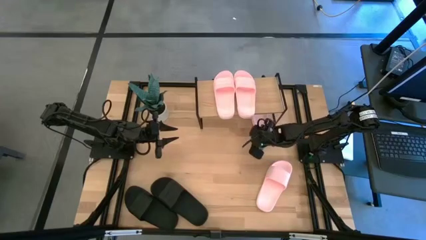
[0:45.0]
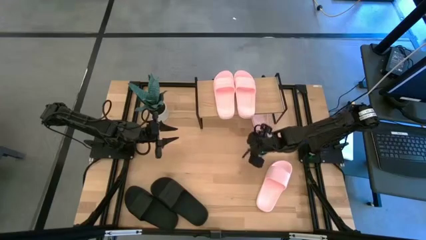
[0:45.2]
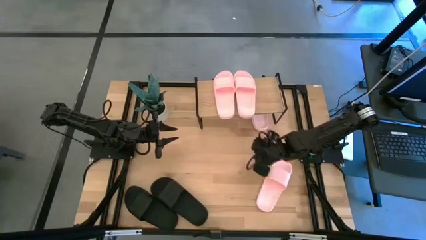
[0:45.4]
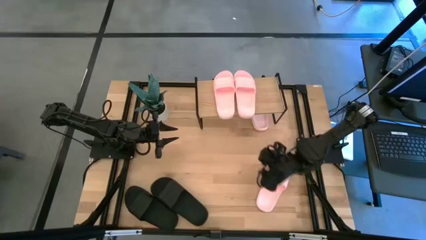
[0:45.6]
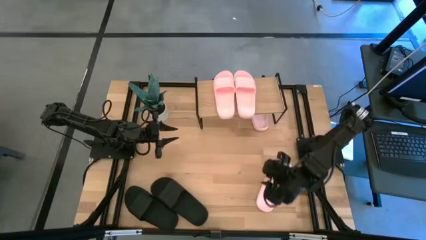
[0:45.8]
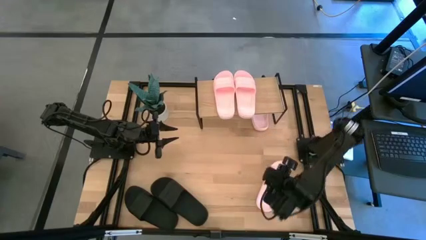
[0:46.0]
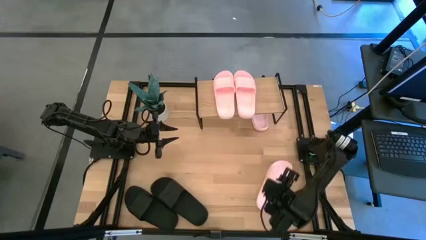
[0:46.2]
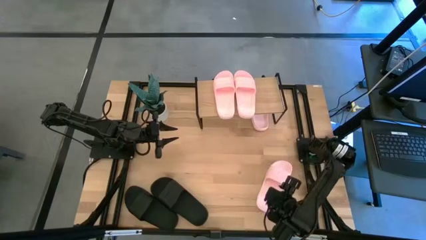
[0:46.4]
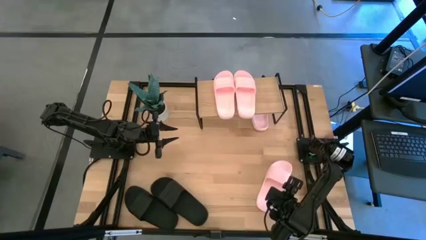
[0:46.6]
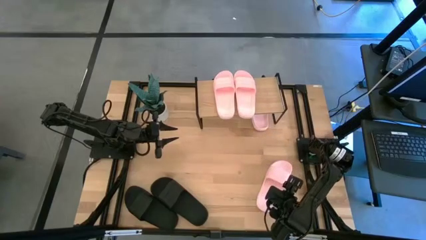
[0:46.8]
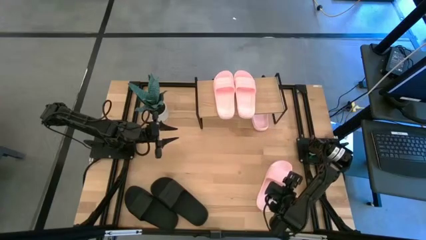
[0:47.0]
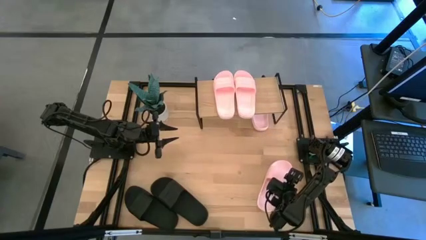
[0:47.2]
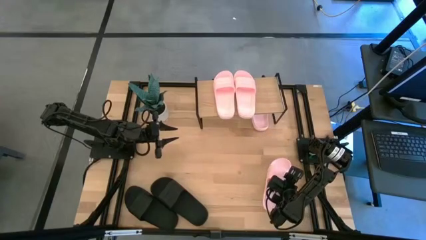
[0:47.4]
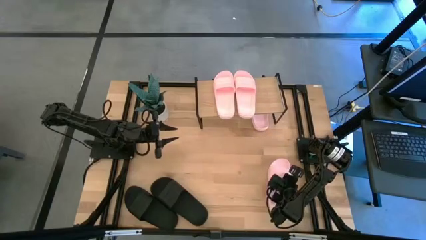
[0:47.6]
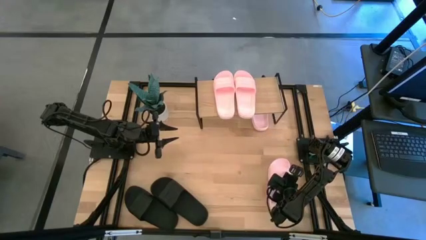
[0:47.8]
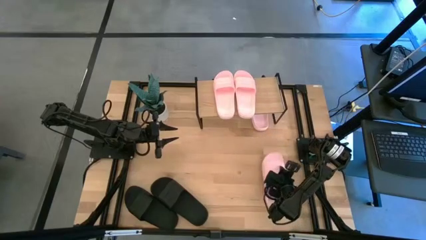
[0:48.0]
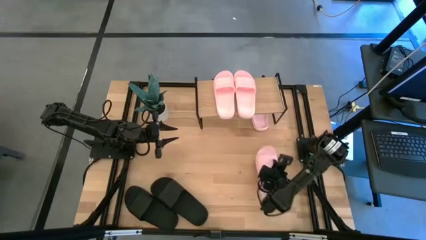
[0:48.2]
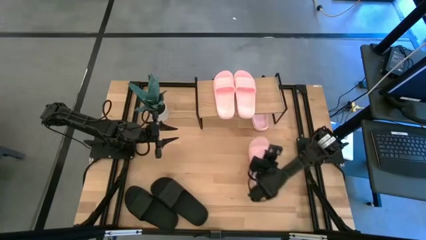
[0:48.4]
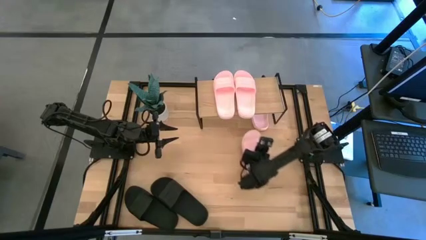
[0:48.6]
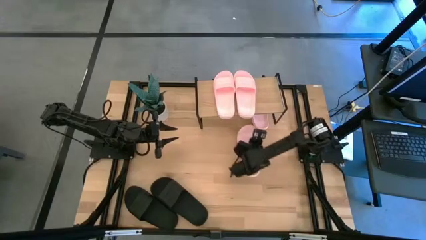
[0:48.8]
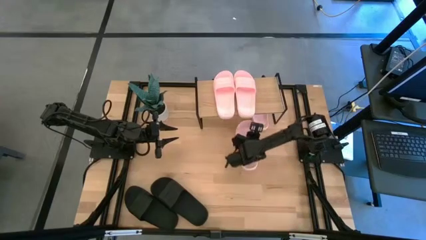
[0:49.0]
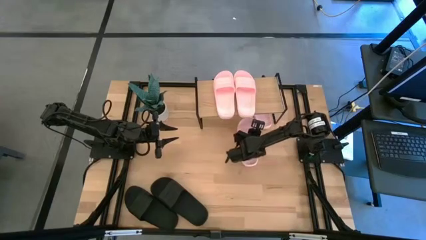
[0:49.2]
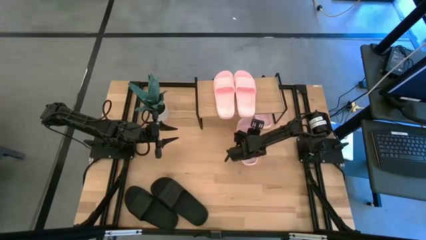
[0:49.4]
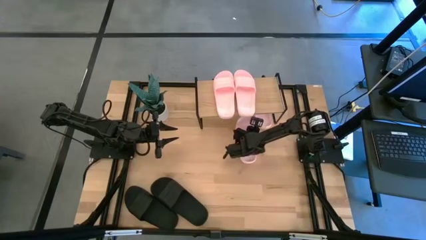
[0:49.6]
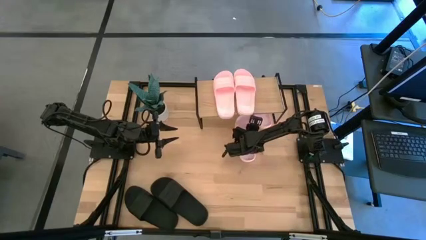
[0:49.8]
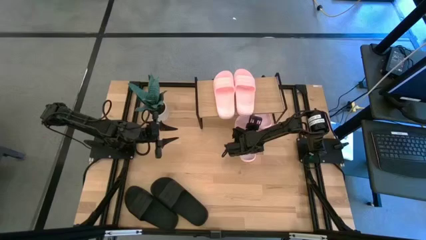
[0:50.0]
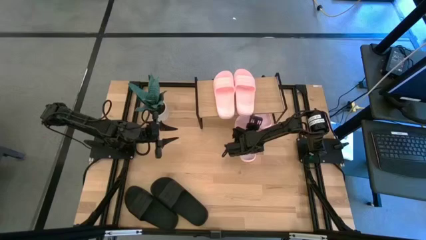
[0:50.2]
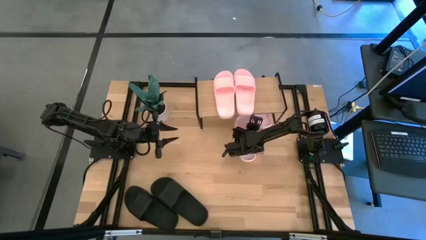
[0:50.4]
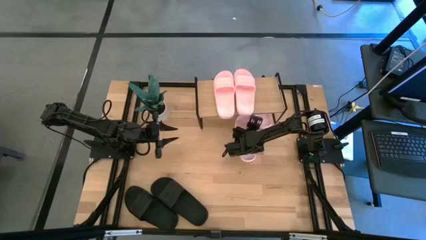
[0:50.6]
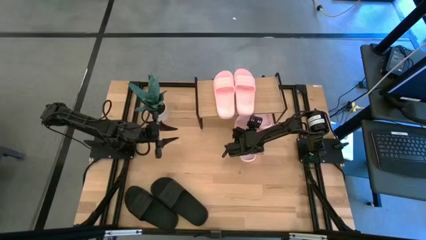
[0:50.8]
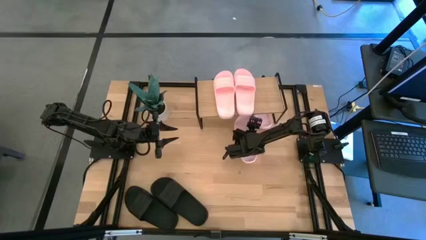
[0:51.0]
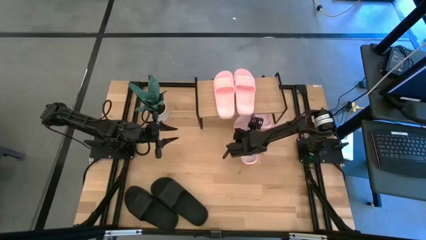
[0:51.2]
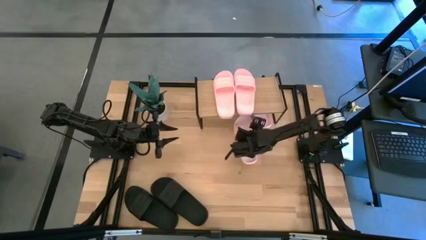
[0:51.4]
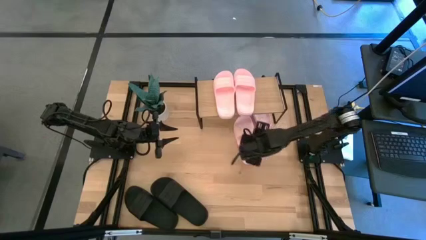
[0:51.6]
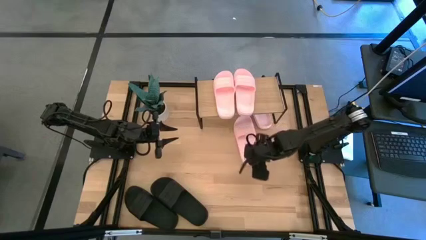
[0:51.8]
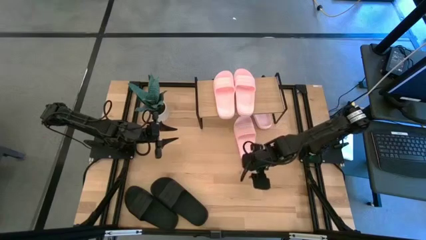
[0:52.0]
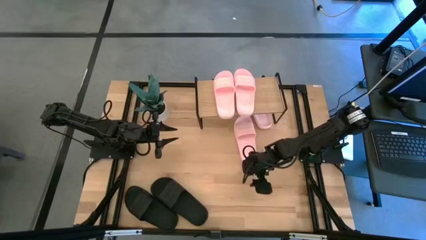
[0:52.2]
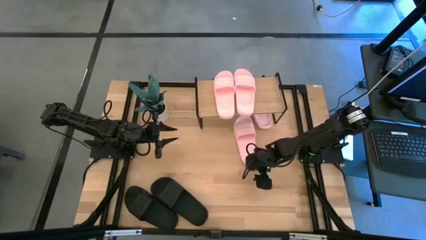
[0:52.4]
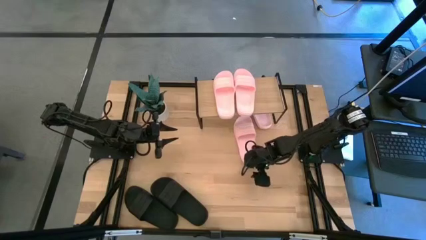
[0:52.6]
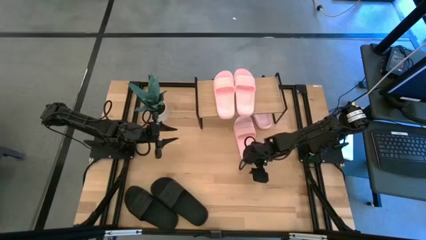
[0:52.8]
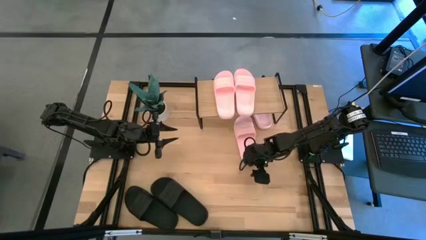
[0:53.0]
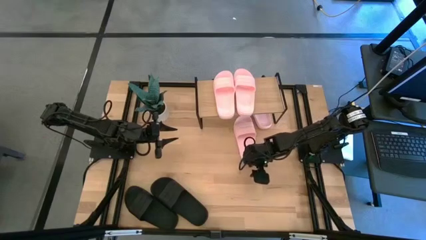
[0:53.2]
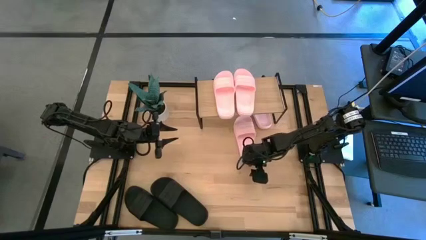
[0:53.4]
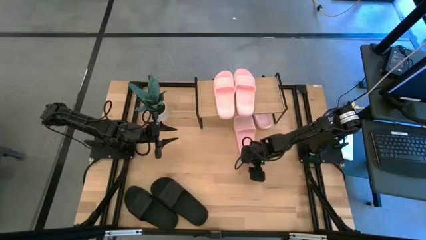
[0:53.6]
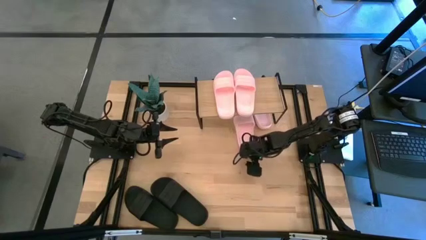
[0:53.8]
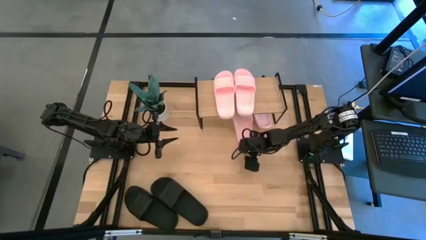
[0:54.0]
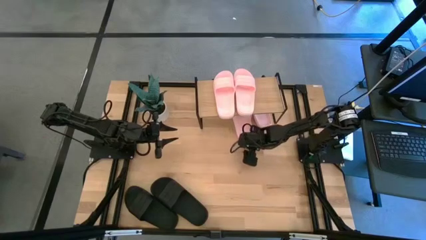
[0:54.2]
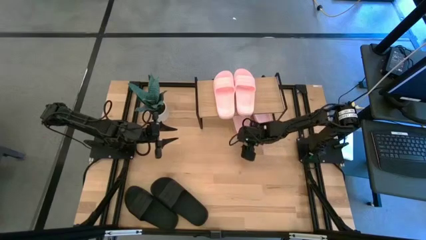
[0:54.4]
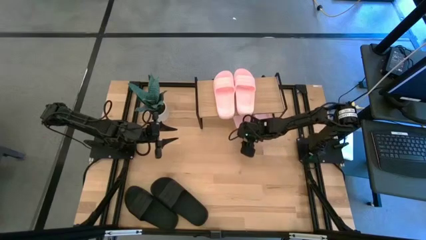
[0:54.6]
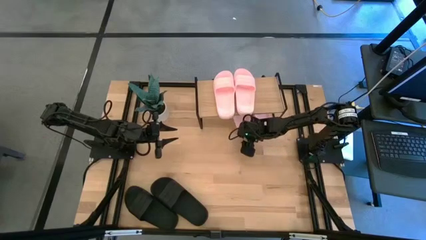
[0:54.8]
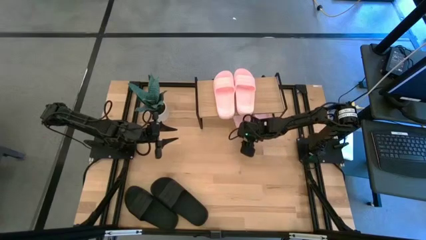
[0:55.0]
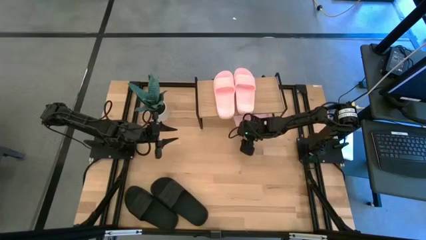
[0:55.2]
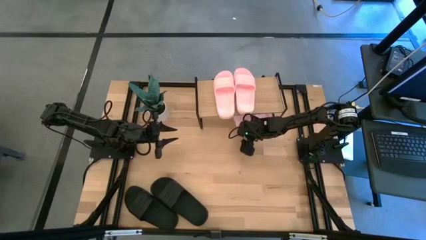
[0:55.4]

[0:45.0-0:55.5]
Task: Pick and place slides into the shelf
Put the pink slipper under the shelf

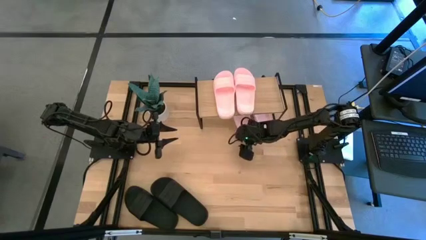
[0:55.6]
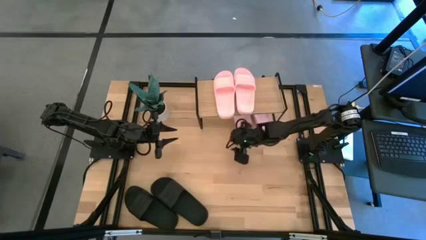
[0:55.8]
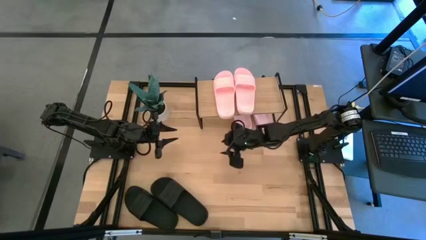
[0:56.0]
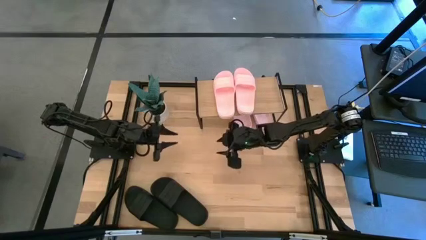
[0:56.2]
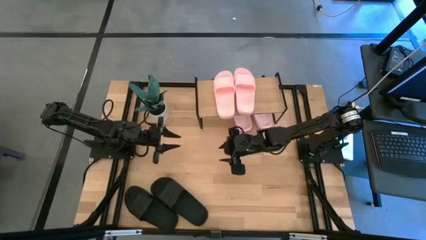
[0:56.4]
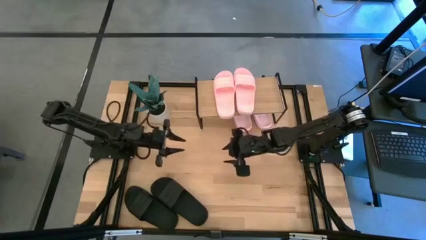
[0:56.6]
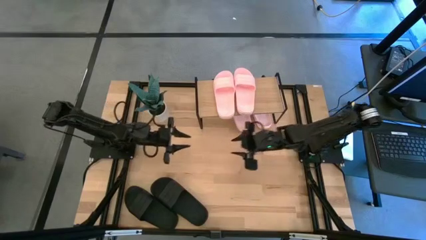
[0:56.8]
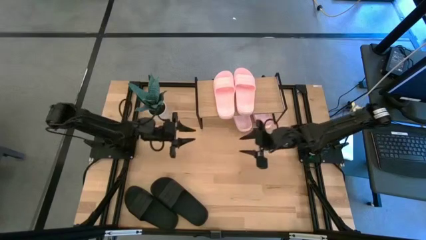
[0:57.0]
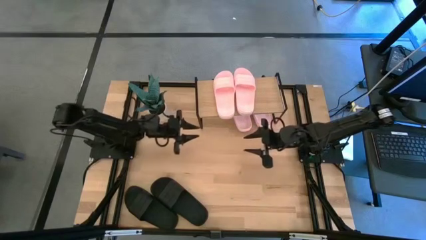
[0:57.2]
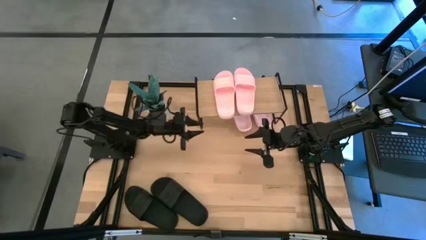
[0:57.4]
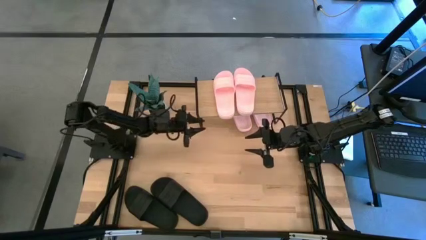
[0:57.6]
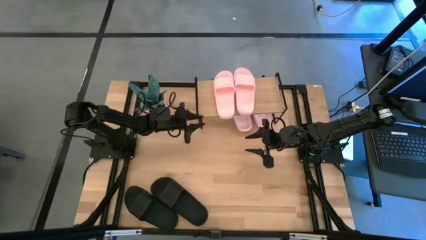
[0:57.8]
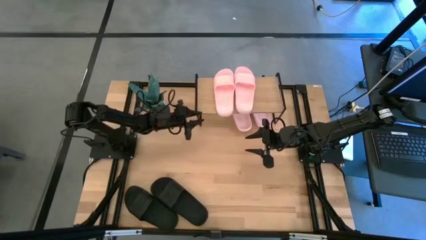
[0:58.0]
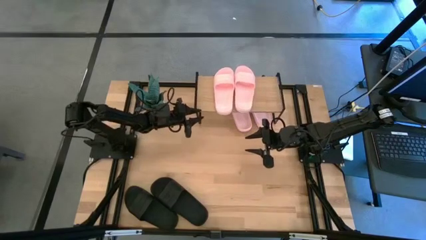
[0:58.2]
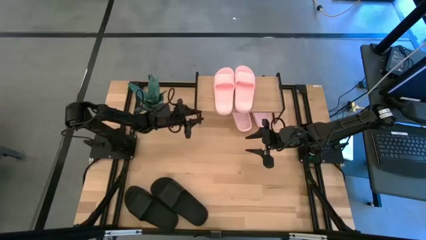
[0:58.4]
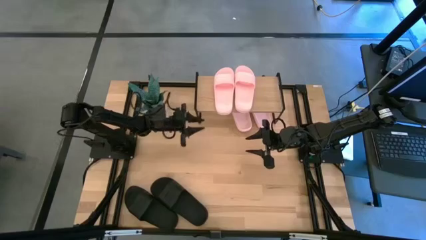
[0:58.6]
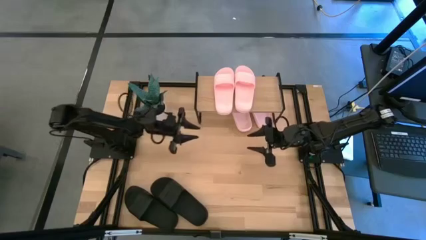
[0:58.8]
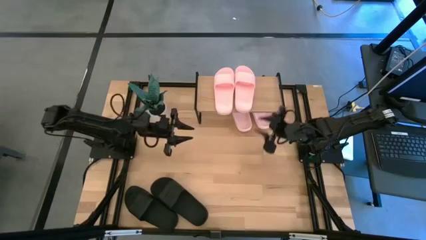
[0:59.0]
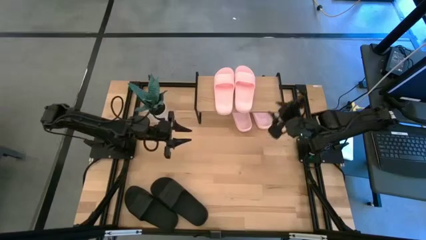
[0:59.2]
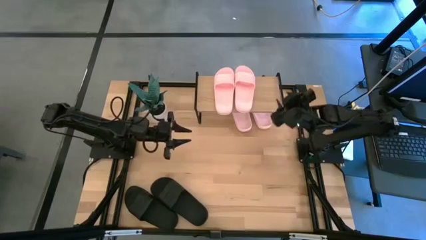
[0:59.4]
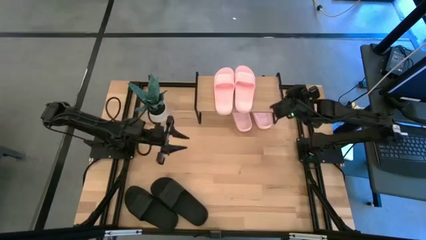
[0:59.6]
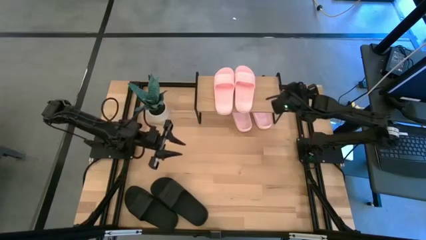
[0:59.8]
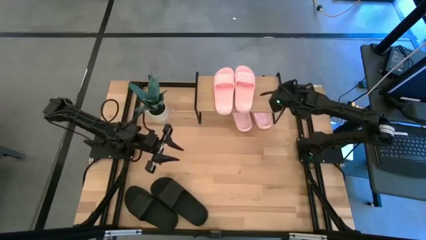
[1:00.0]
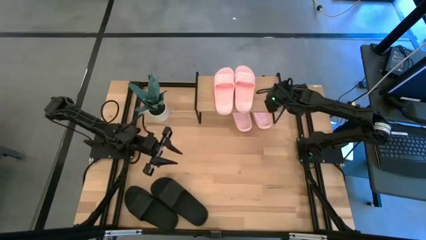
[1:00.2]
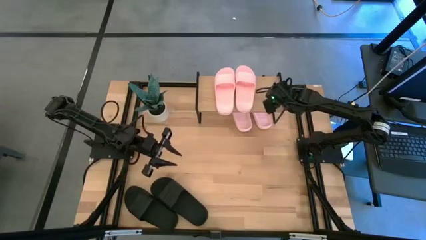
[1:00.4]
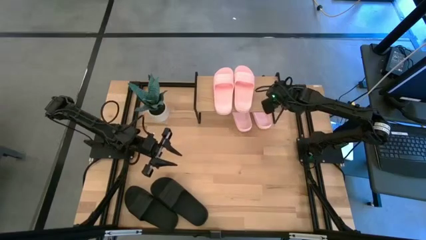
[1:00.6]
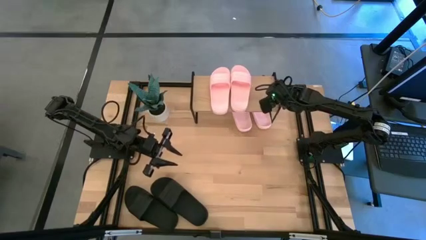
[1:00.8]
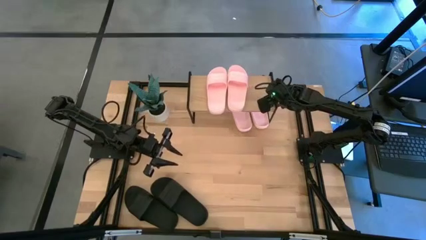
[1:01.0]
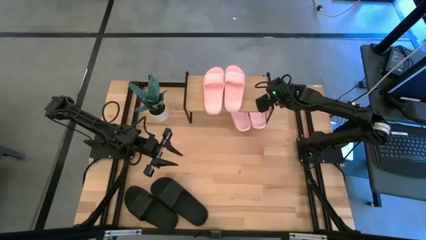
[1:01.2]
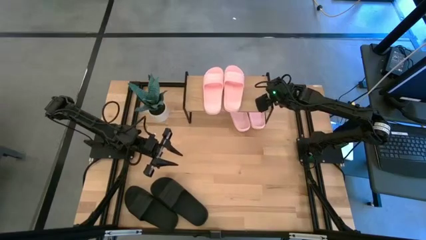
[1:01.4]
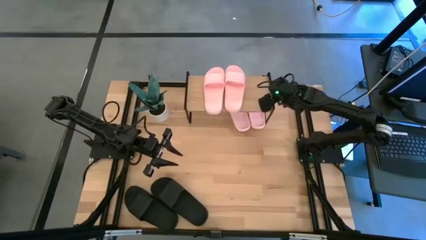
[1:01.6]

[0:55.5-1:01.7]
Adjust the shelf
